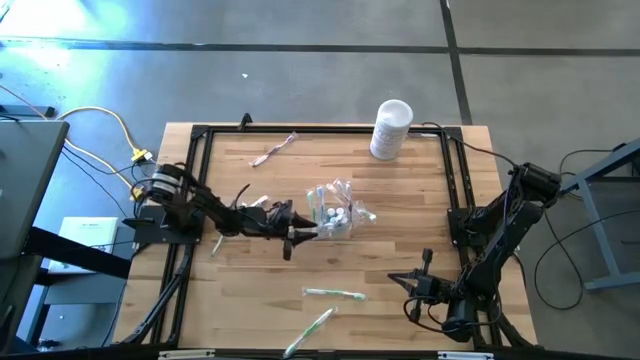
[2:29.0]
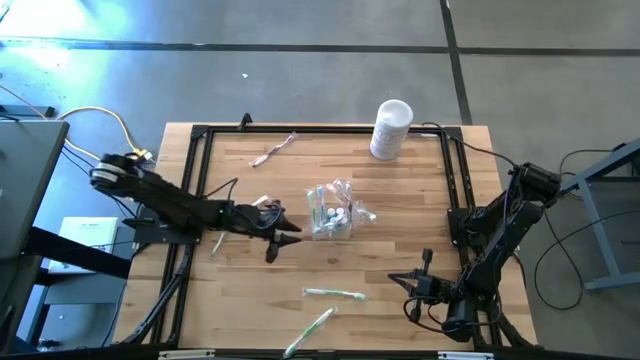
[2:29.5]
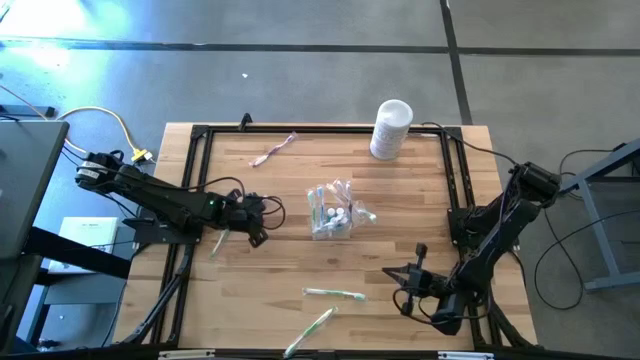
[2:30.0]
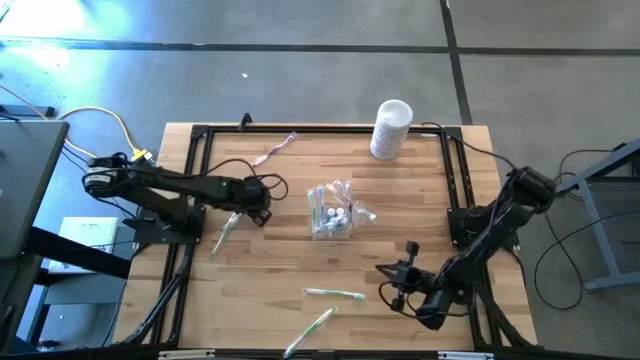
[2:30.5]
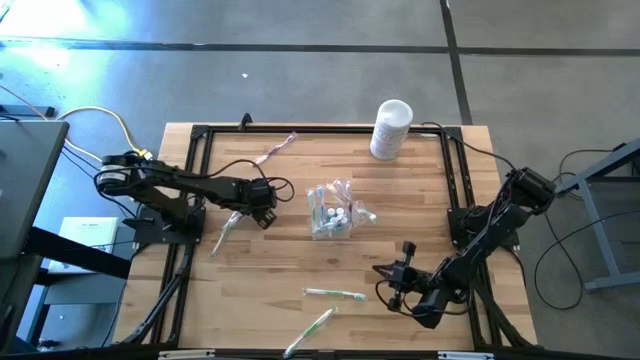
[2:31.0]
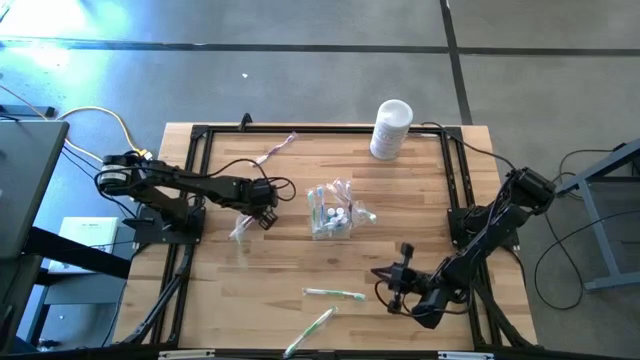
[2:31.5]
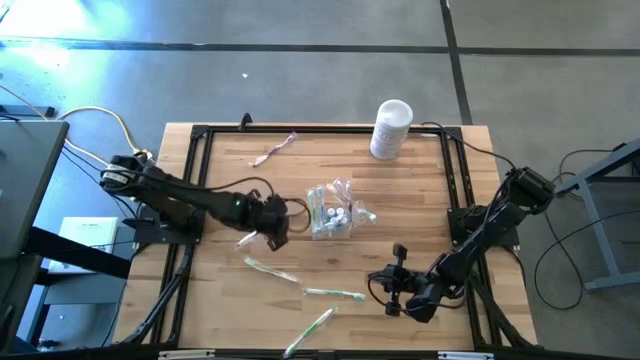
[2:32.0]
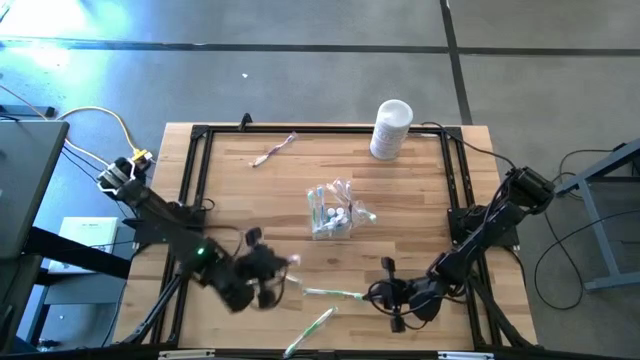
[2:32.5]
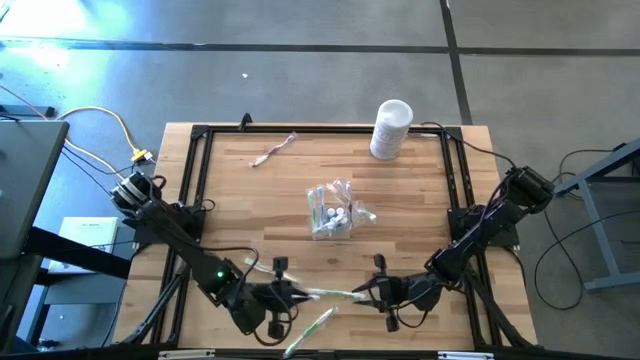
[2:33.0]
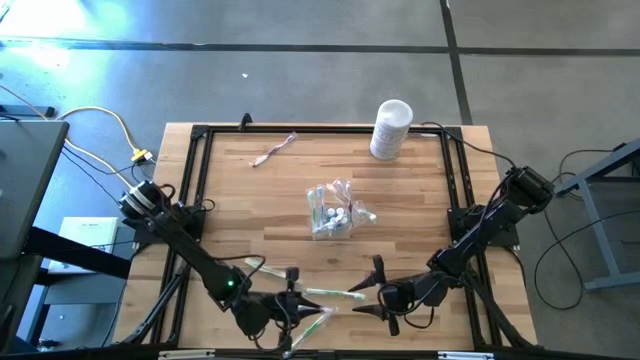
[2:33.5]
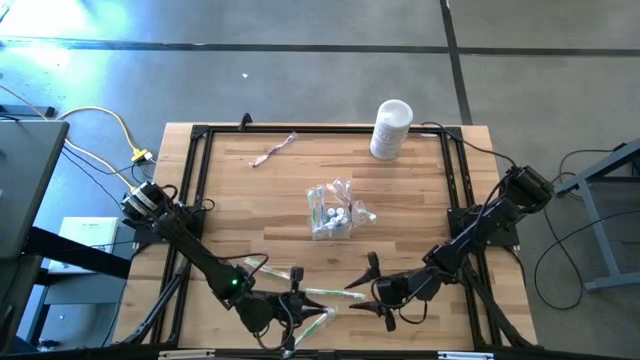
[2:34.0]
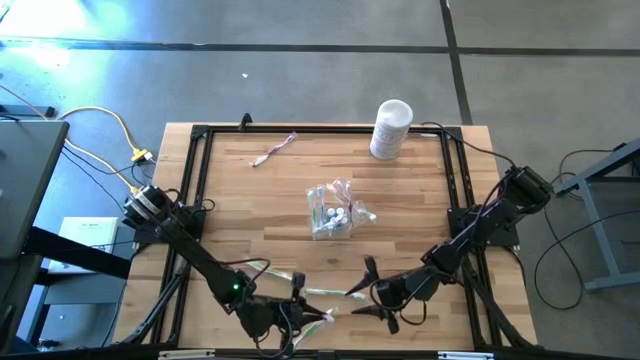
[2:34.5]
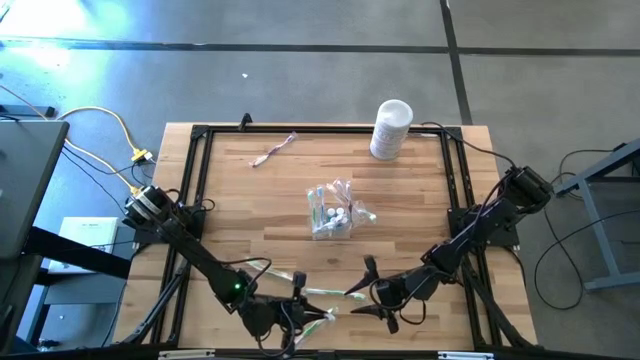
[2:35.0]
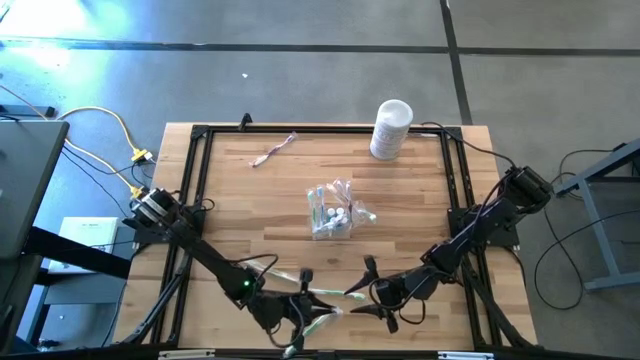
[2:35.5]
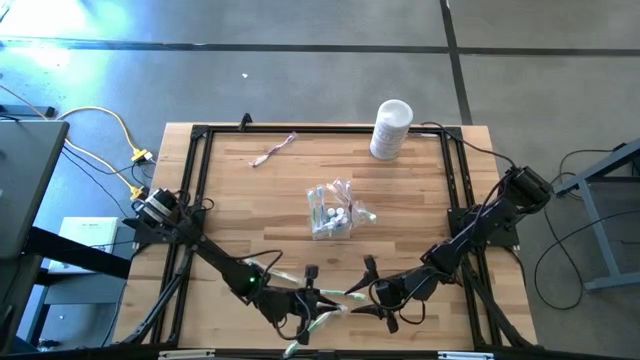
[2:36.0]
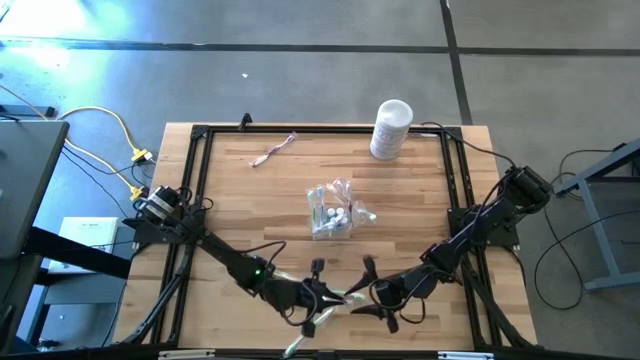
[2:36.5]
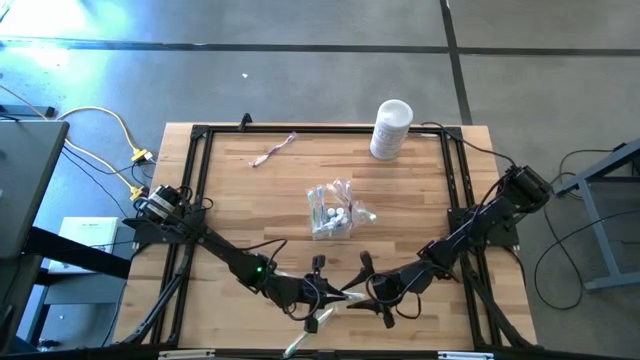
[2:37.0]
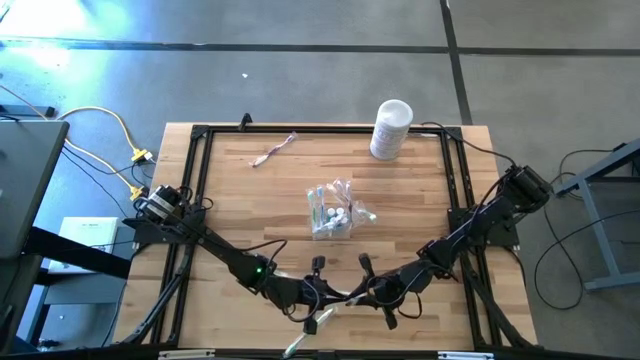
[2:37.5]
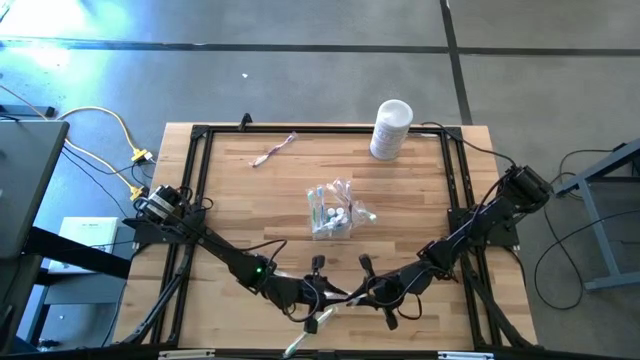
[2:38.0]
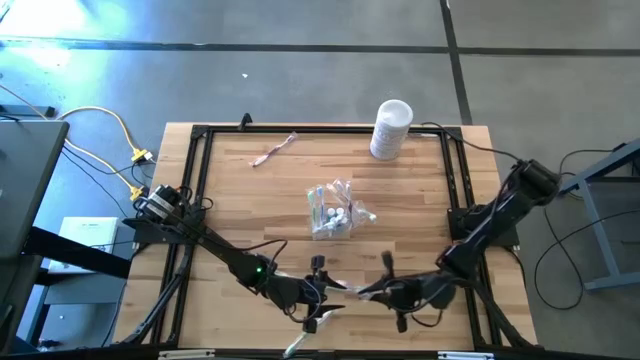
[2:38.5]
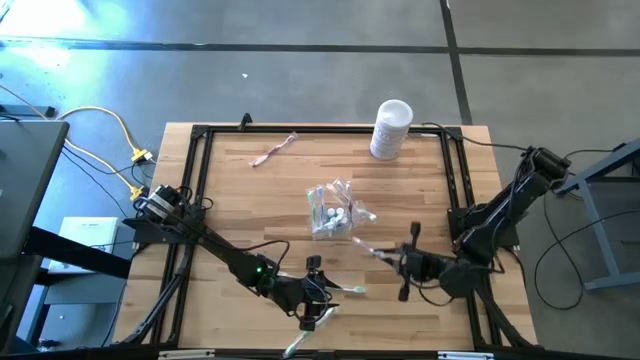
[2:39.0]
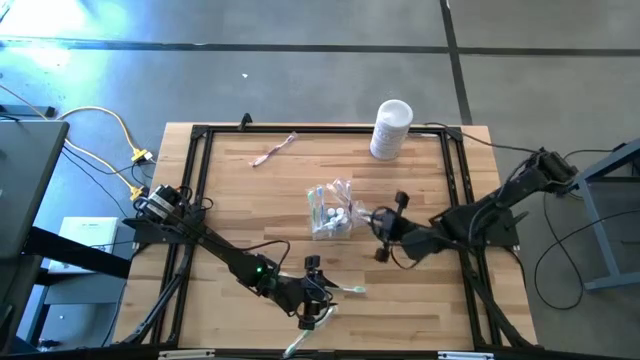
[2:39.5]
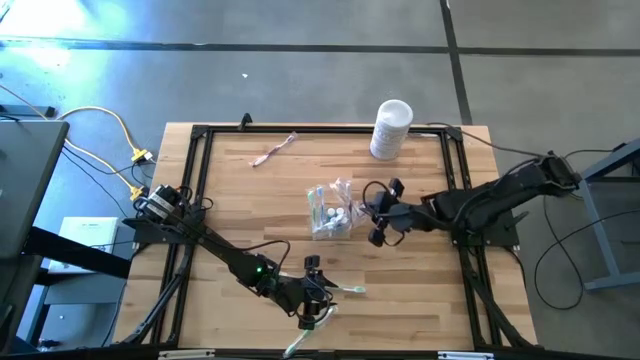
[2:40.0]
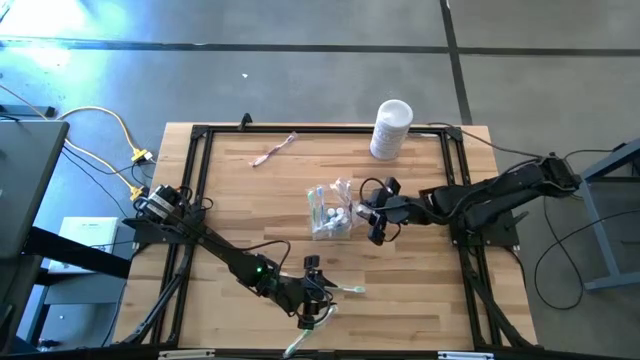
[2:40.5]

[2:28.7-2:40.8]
Task: Pick & Place toothbrushing station
Put the violet toothbrush into the transparent organizer

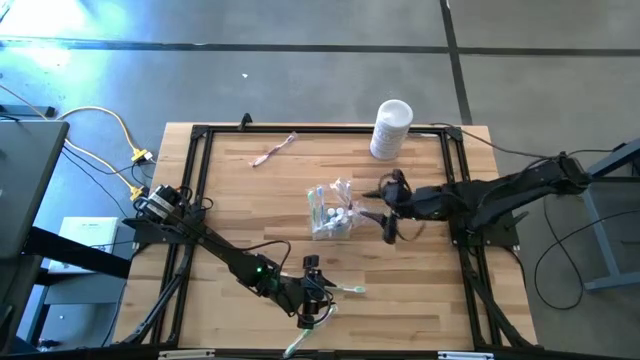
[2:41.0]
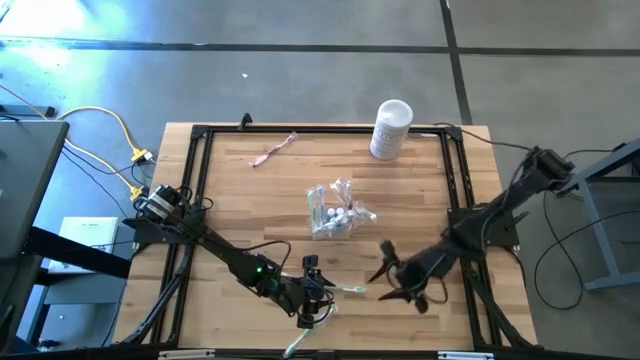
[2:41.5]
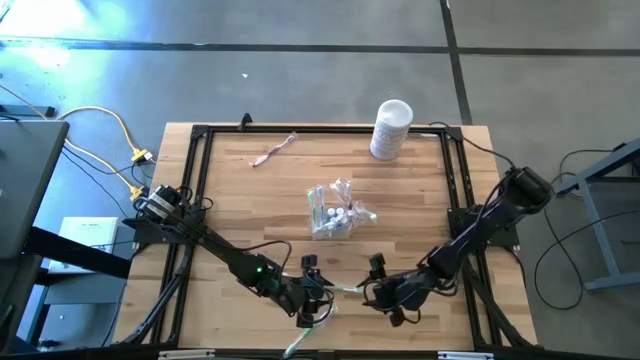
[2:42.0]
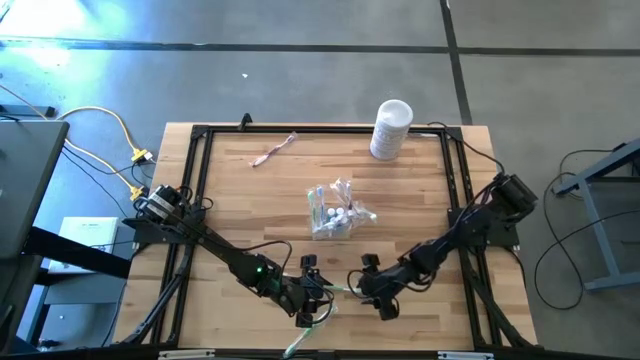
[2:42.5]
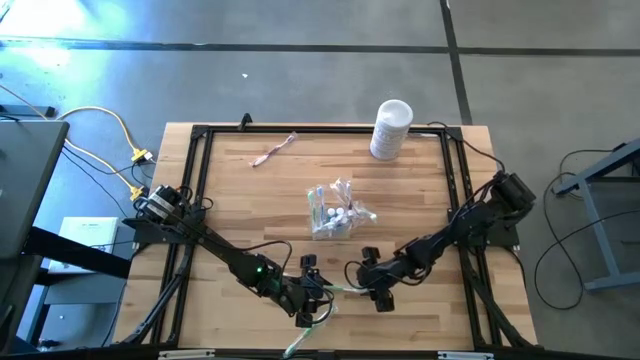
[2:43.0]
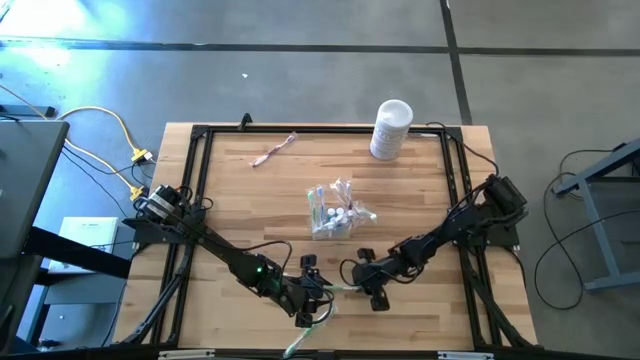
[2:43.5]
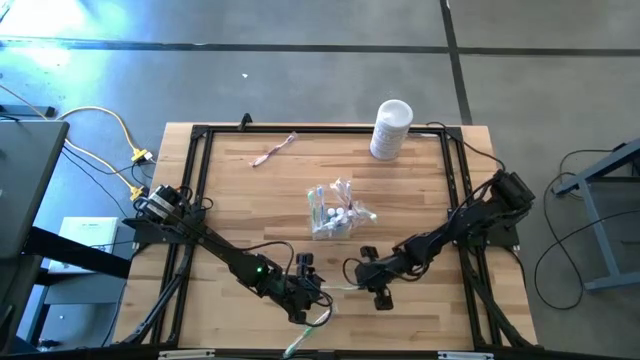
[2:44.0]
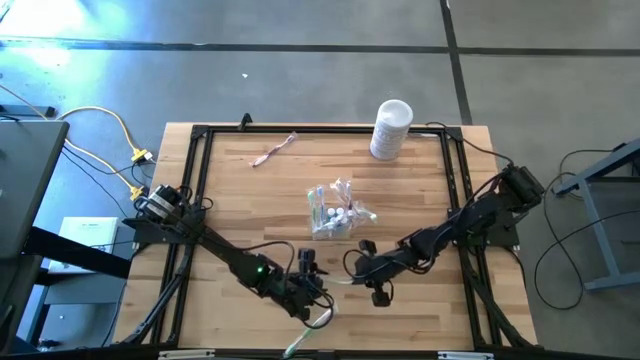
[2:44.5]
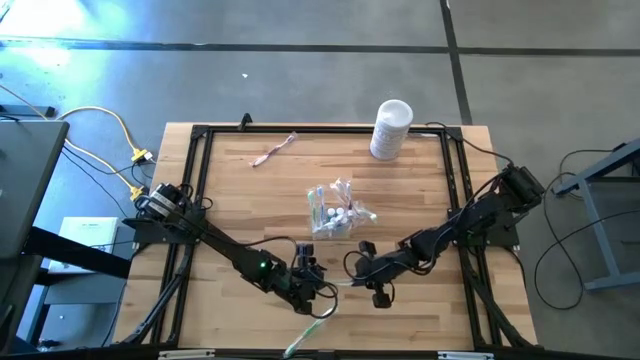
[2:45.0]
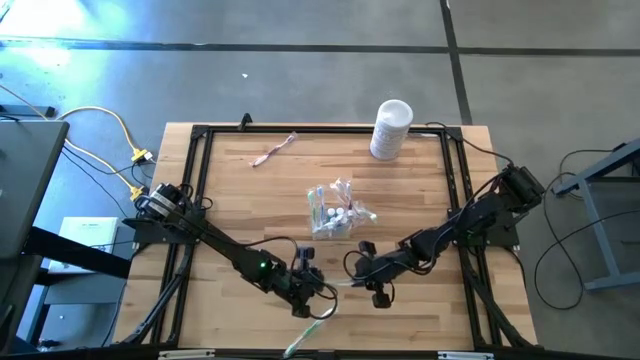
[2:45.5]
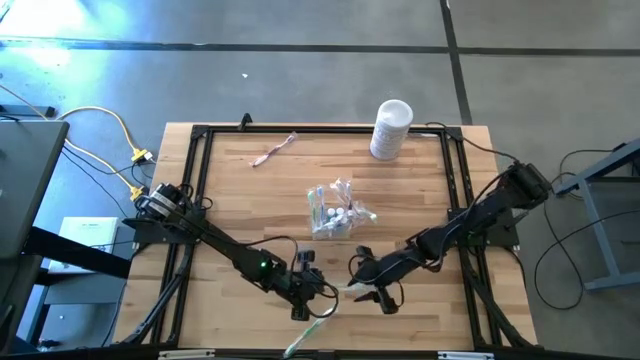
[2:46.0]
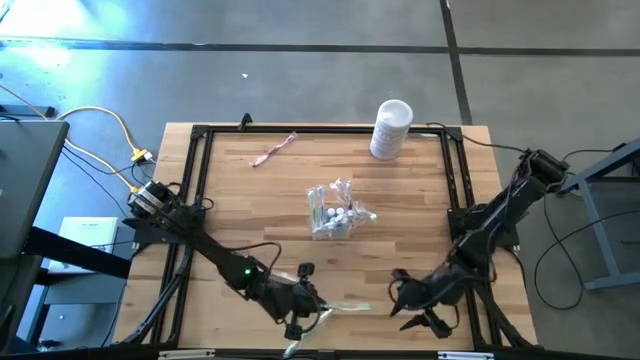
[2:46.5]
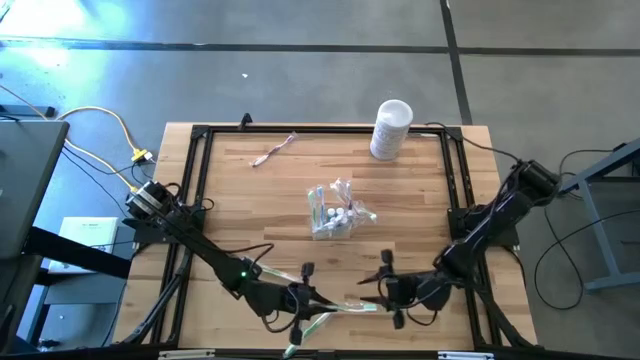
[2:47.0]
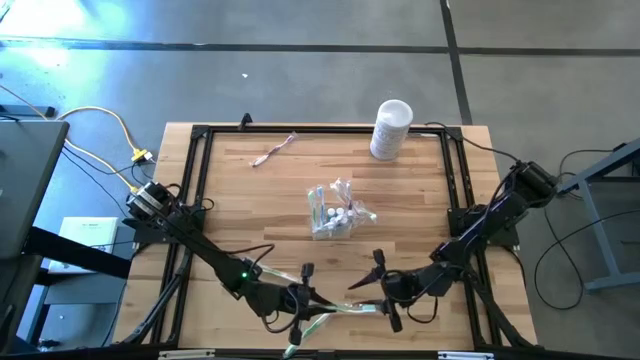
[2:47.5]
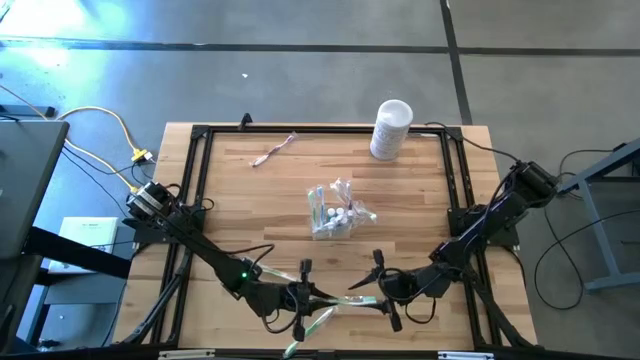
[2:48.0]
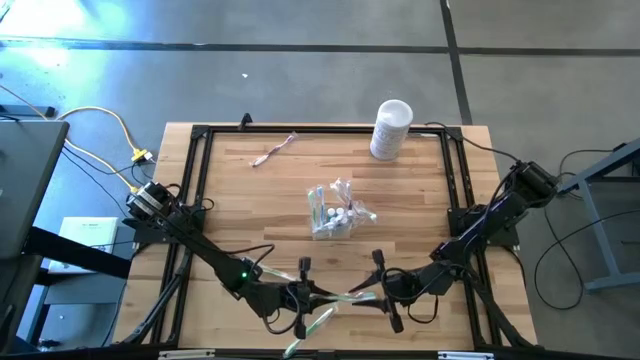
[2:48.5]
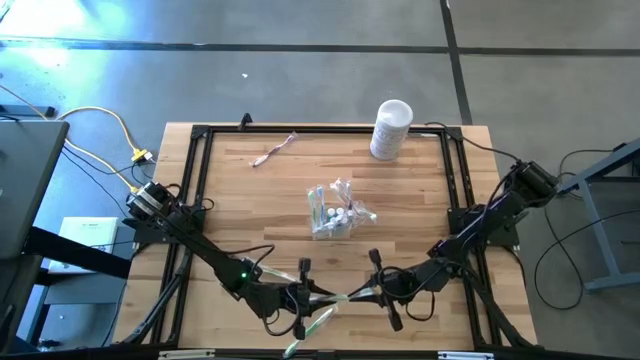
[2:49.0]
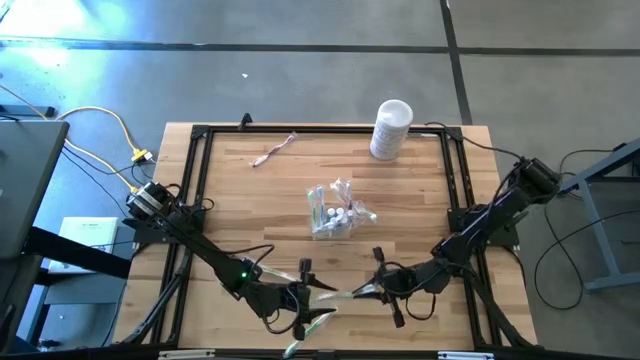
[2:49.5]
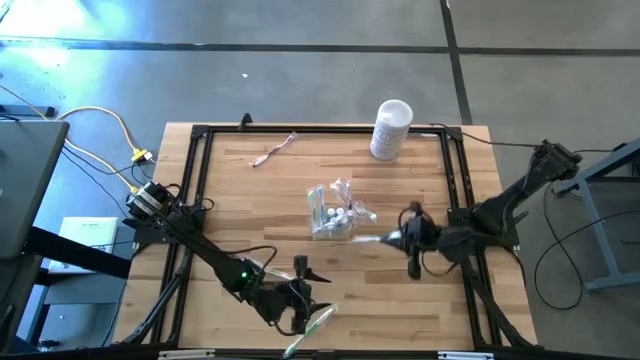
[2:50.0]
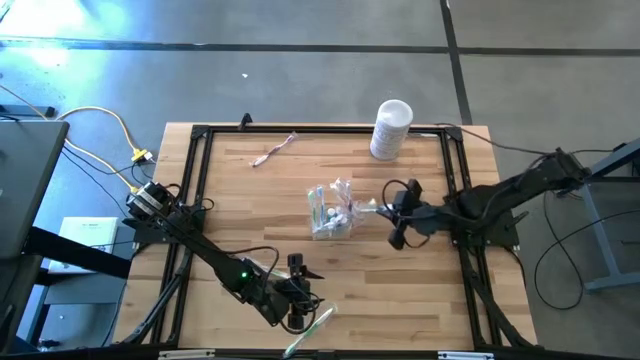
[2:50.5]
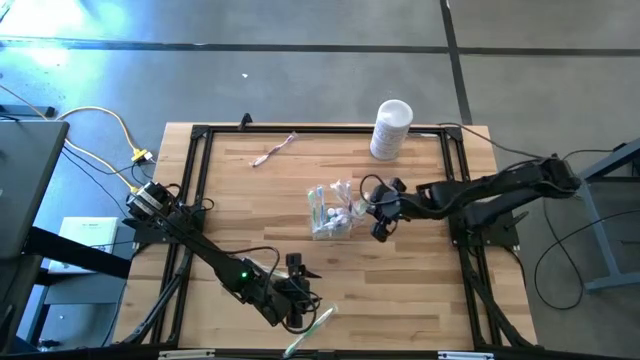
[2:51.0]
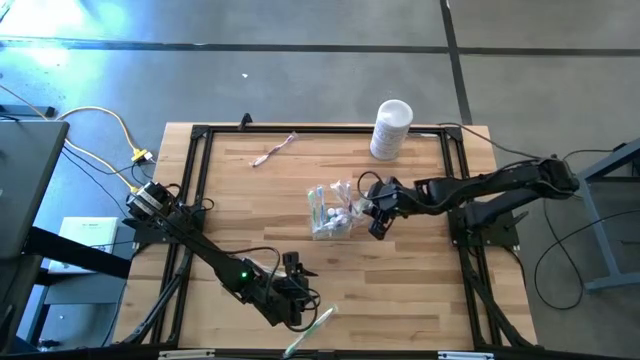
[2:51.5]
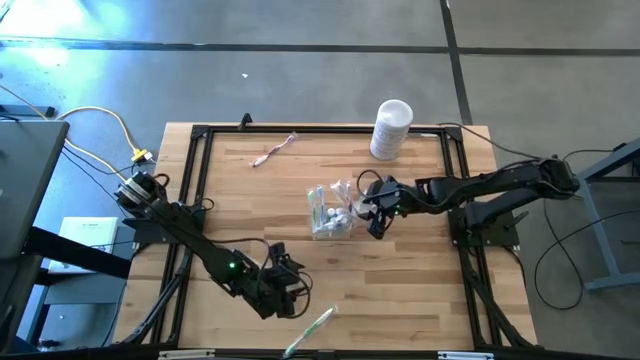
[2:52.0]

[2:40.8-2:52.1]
Put the green toothbrush into the transparent organizer
